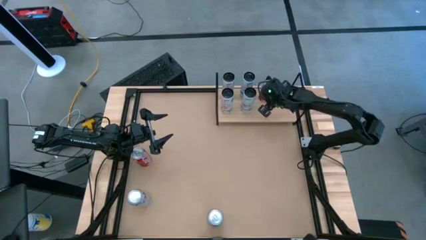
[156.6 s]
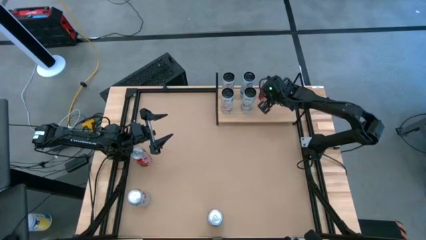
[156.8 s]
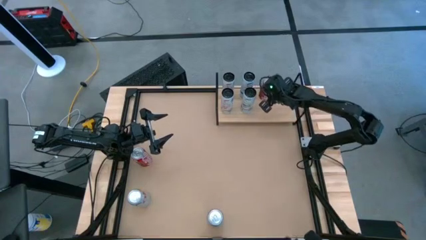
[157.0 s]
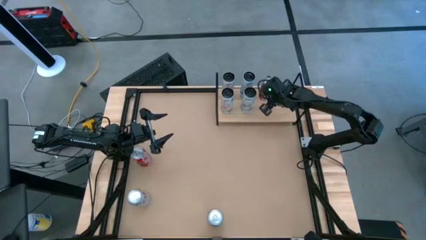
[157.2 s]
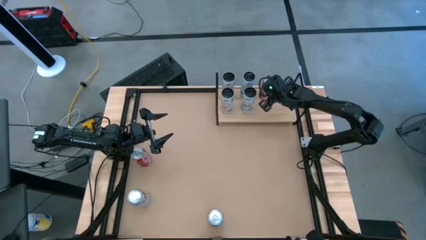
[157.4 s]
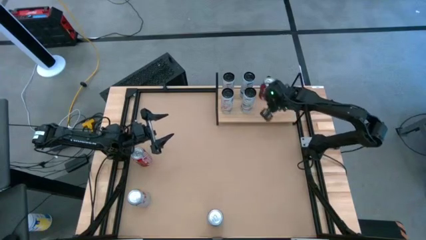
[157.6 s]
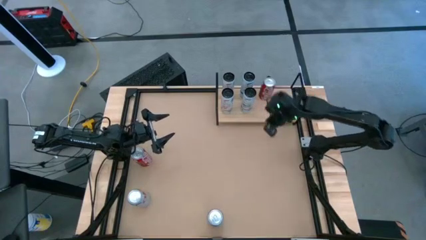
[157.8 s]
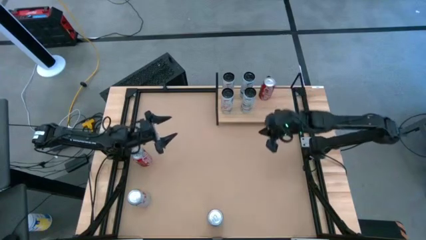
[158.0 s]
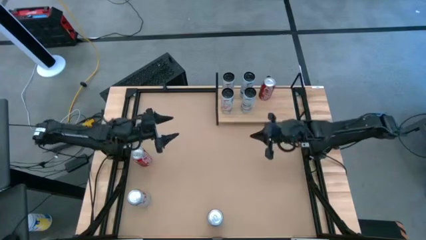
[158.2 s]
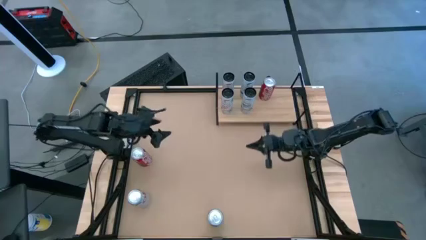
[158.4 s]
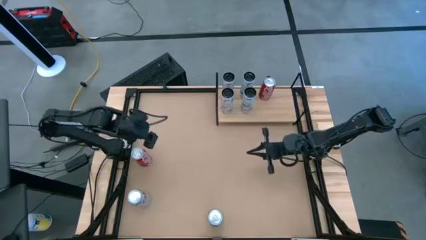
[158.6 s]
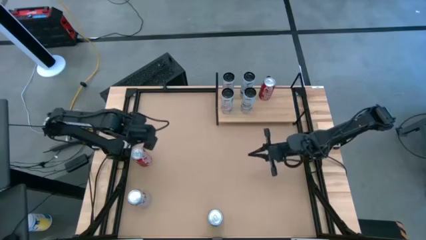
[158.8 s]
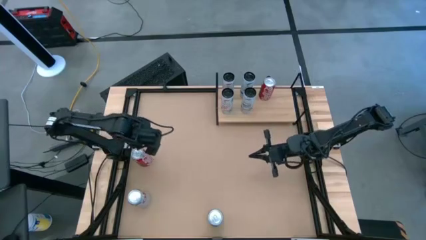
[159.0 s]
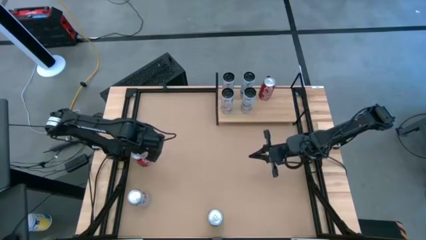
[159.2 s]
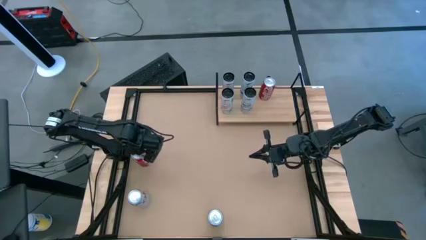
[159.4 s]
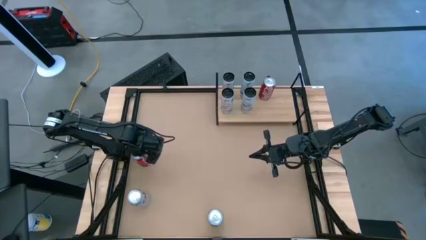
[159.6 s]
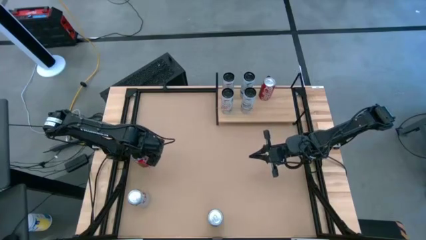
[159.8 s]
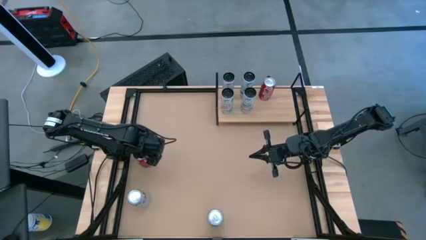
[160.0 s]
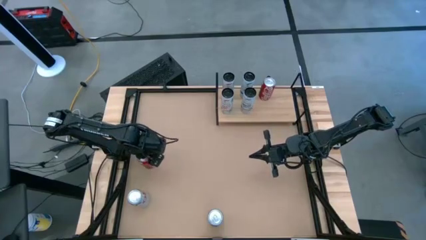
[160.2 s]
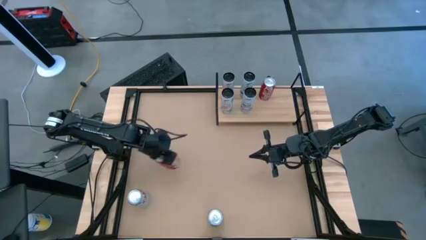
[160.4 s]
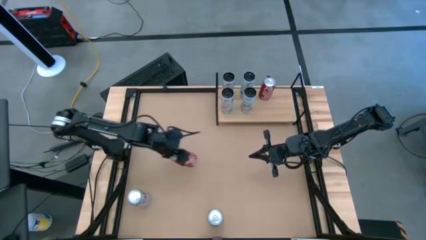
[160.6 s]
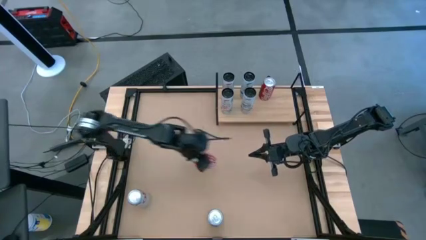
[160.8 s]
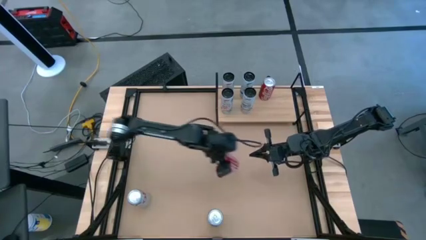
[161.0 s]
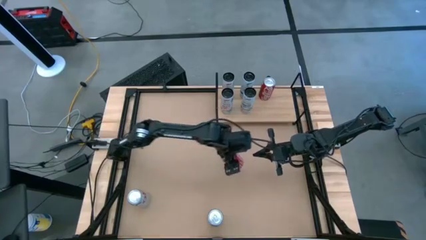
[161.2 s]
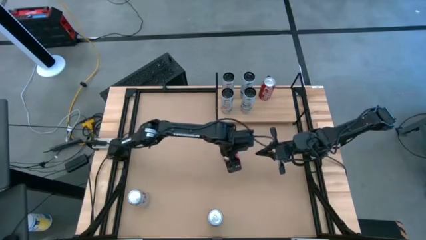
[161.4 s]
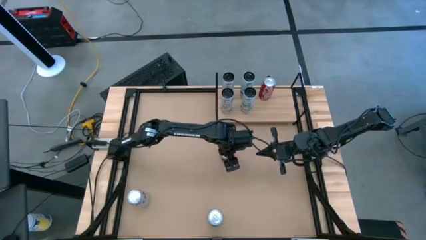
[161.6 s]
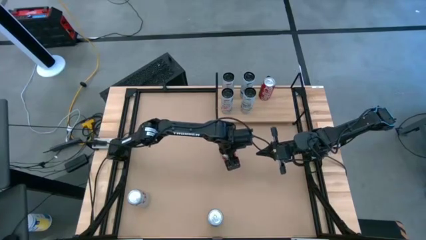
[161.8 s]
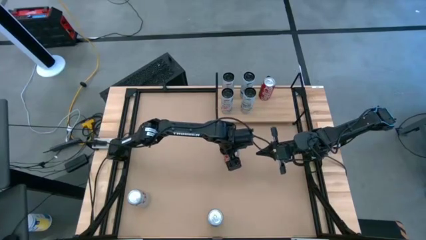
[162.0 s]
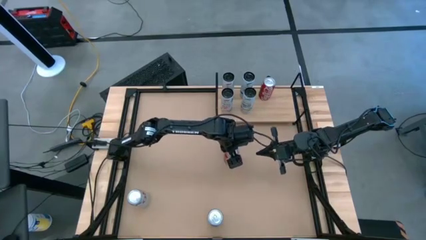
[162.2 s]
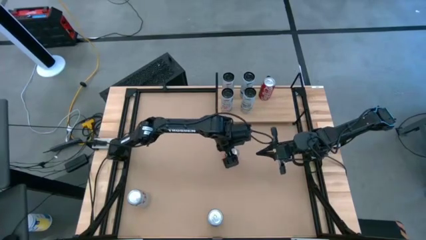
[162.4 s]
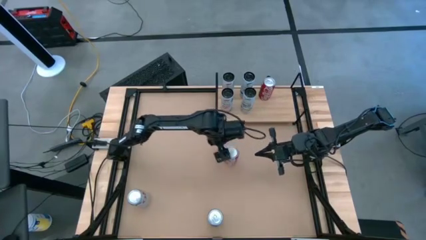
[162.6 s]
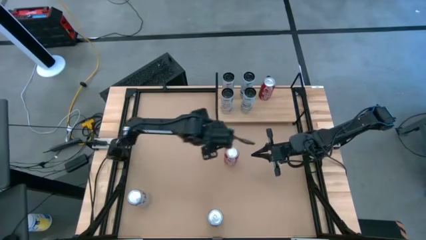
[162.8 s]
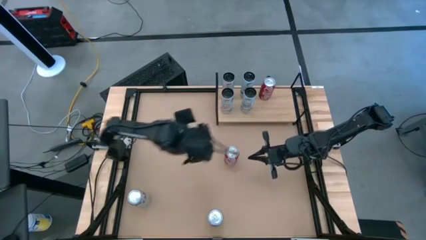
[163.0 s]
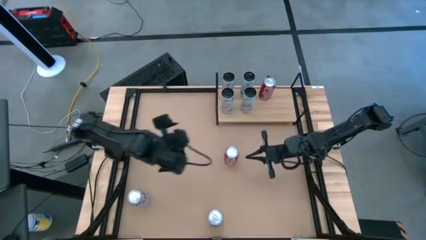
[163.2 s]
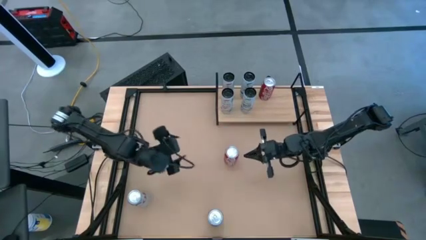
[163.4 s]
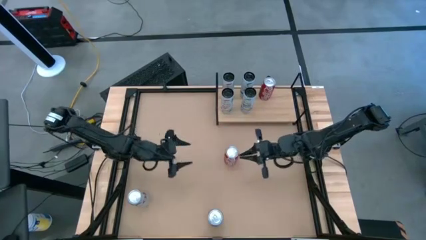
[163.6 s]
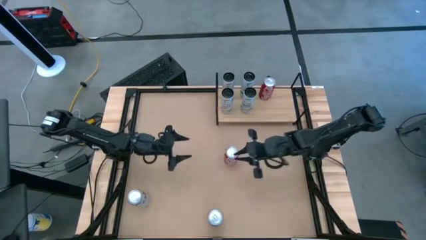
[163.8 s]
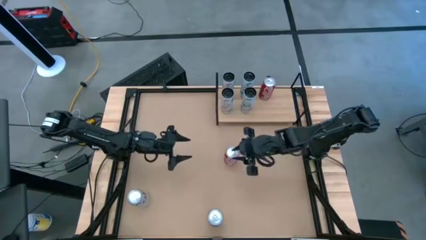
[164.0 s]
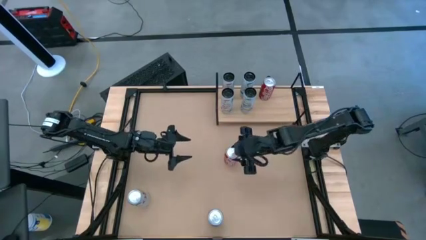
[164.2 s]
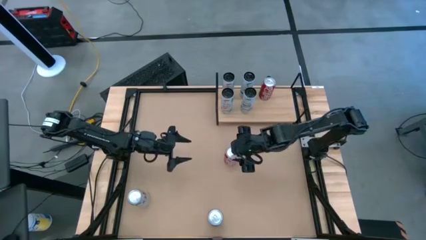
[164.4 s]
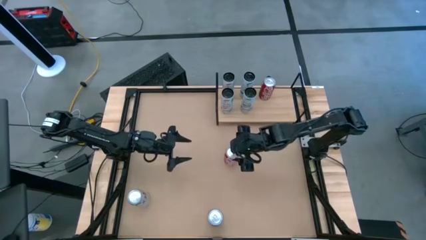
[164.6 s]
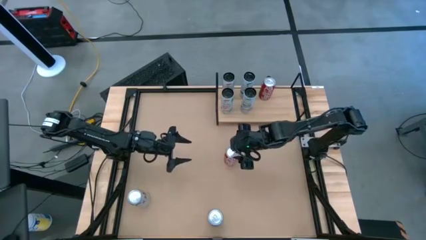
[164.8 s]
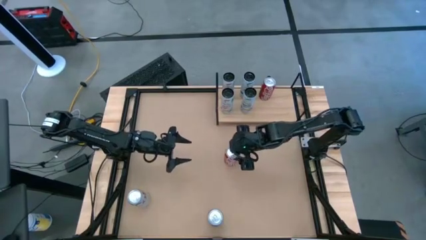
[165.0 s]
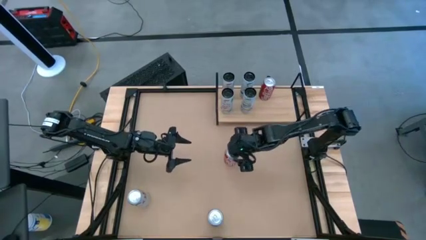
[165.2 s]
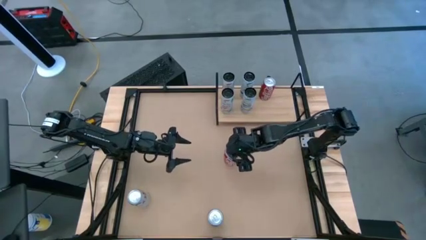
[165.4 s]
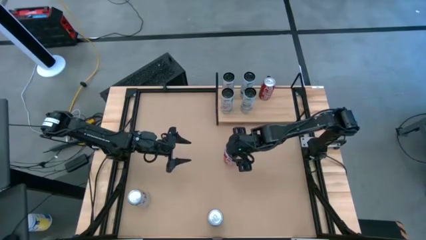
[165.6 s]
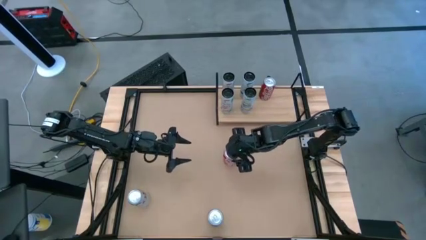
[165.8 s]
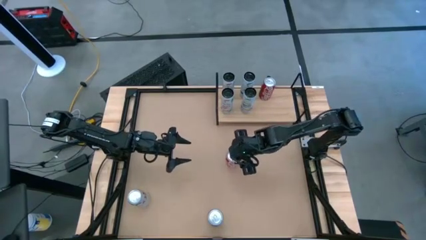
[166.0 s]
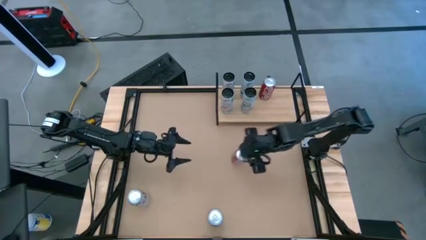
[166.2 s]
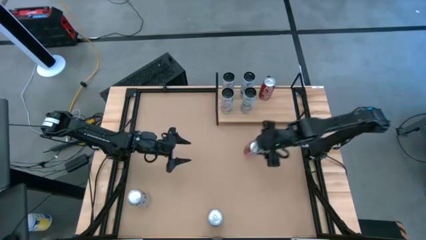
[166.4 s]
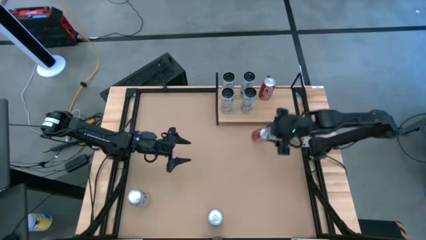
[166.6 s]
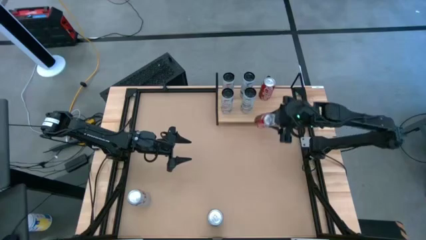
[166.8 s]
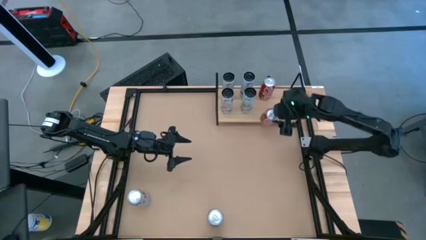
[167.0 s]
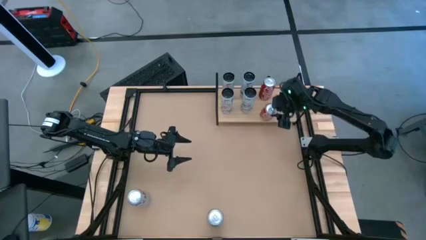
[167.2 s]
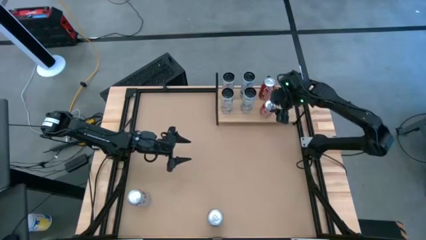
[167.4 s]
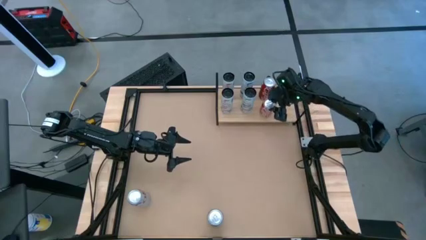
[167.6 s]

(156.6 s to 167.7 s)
Task: Place canned beverage on shelf
Put the red soda can on the shelf align with the other red soda can

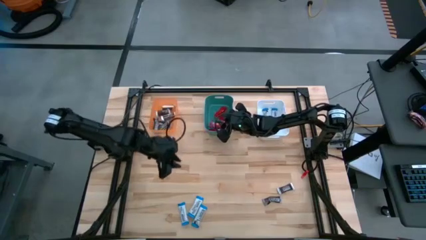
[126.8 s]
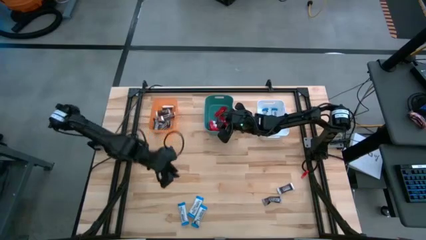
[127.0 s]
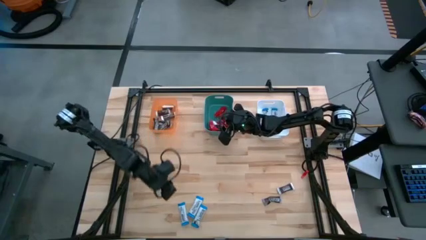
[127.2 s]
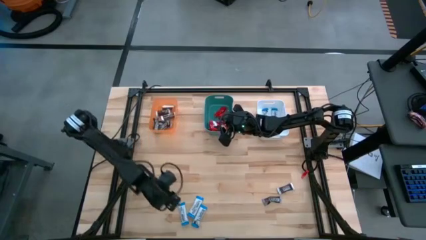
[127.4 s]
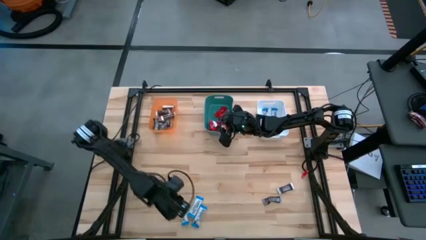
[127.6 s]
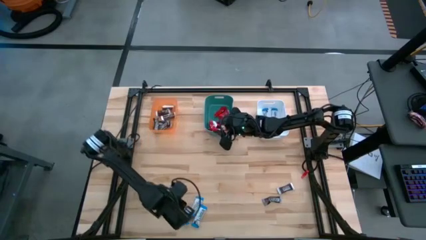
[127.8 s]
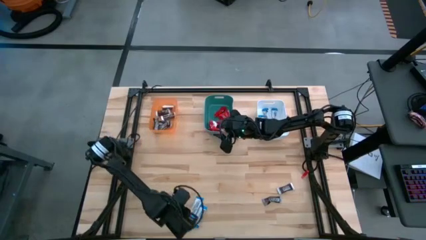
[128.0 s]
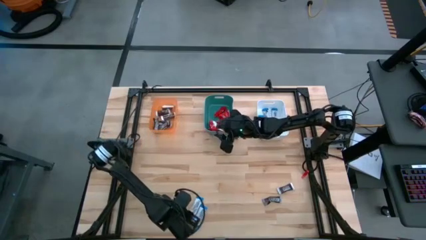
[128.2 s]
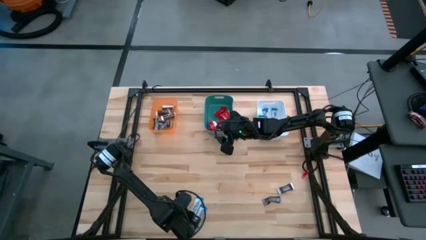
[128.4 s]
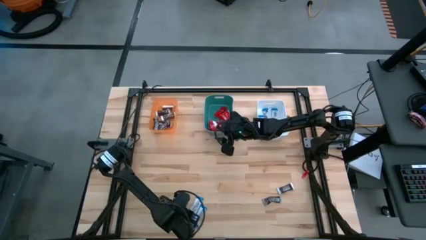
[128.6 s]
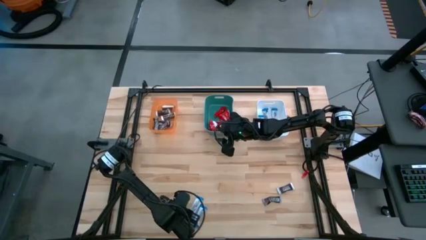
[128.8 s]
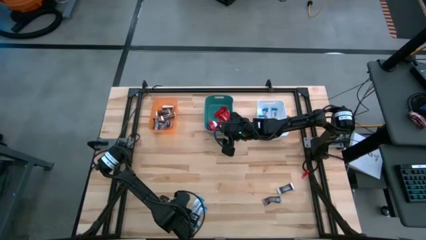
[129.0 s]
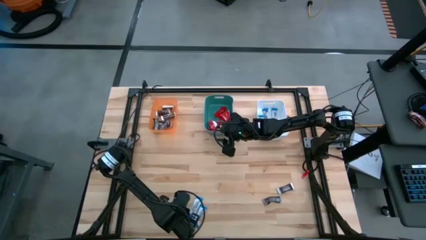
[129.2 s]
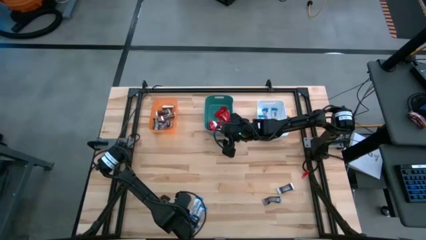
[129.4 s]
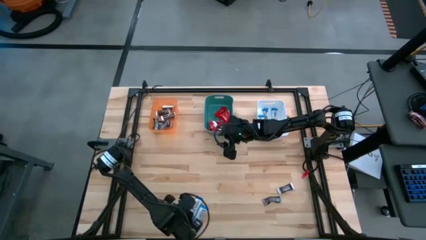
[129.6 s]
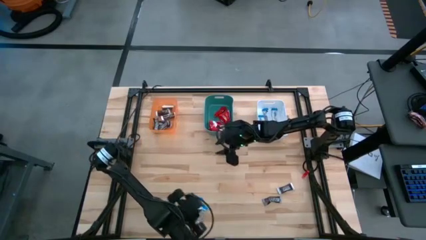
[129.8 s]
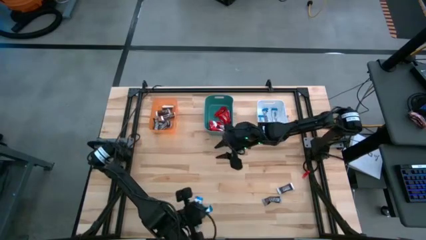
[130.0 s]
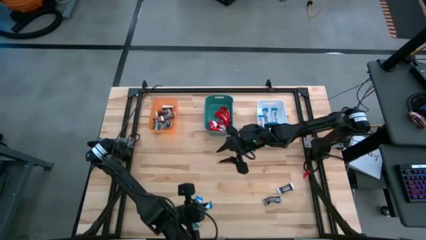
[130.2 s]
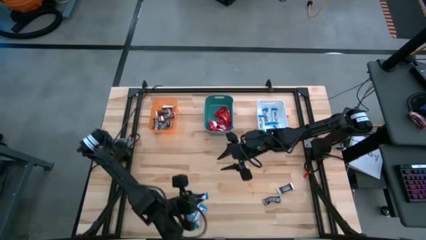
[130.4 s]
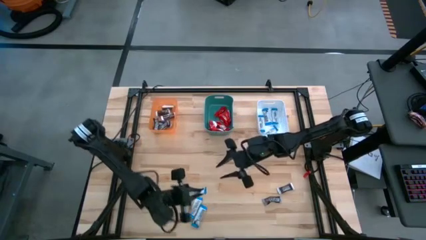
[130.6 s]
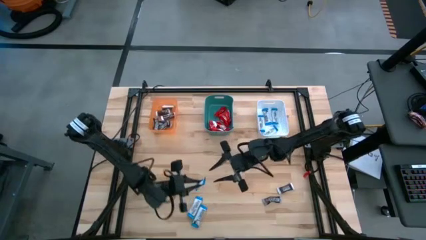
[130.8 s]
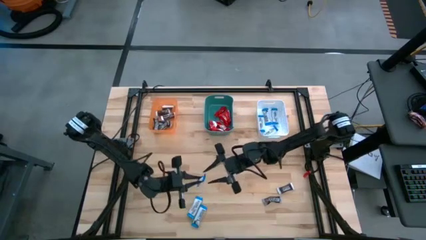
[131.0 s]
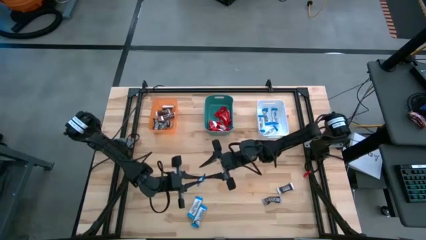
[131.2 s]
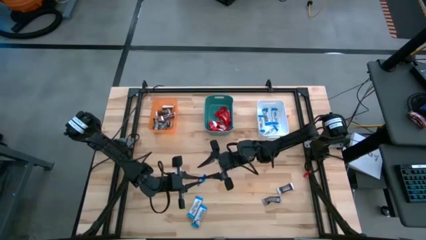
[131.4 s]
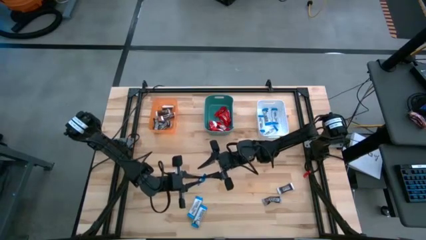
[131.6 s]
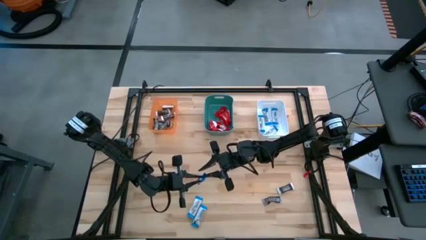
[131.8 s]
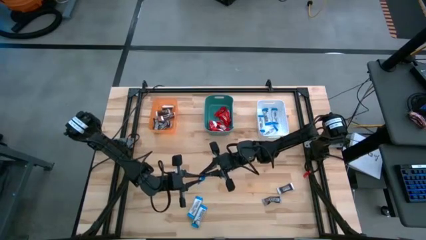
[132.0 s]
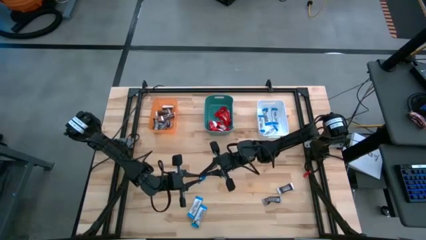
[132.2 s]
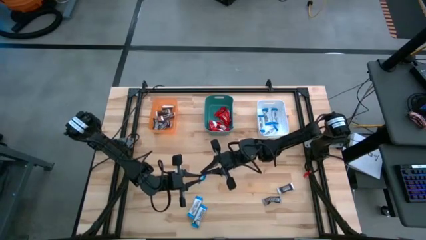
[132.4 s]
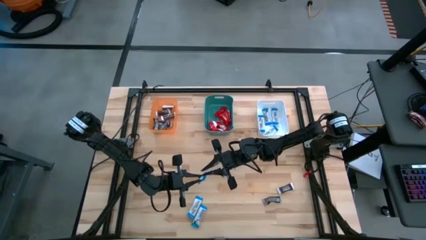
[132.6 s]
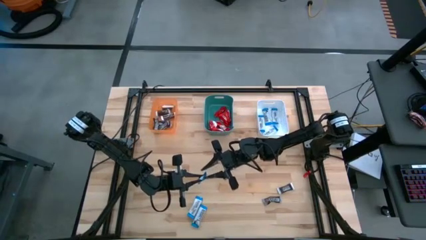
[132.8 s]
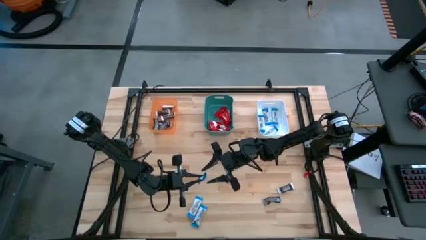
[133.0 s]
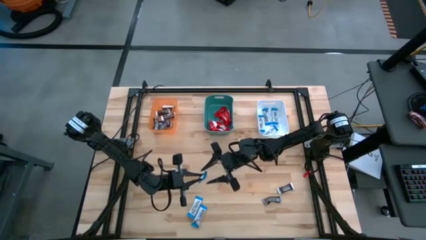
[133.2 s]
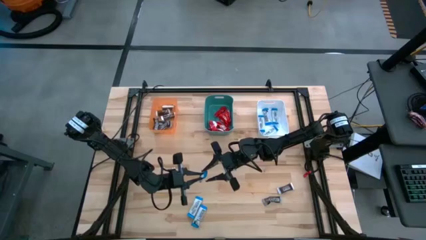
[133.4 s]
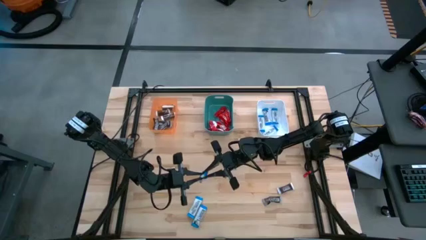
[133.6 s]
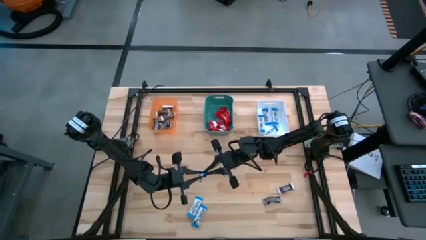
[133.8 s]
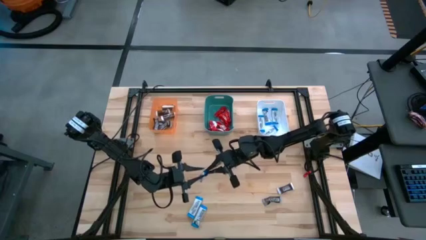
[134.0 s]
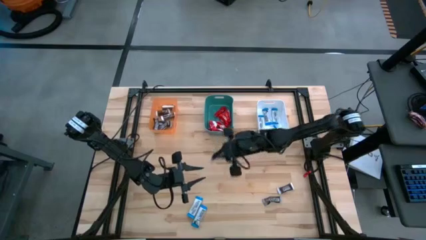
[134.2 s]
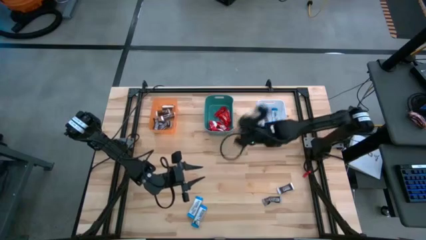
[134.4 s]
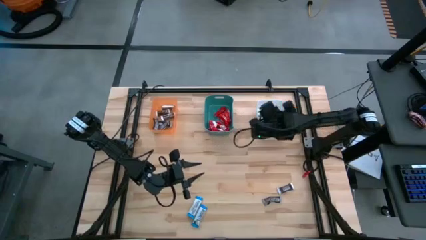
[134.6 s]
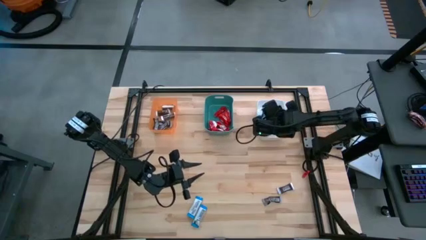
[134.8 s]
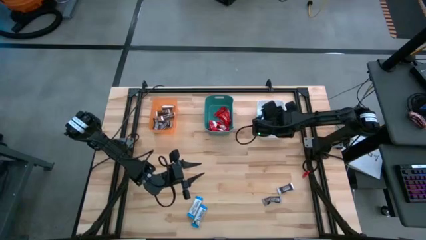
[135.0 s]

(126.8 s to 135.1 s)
Task: Organize candy in baskets
Put the white chocolate bar into the white bin
